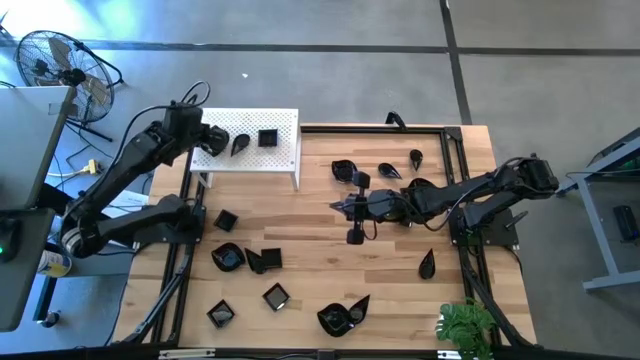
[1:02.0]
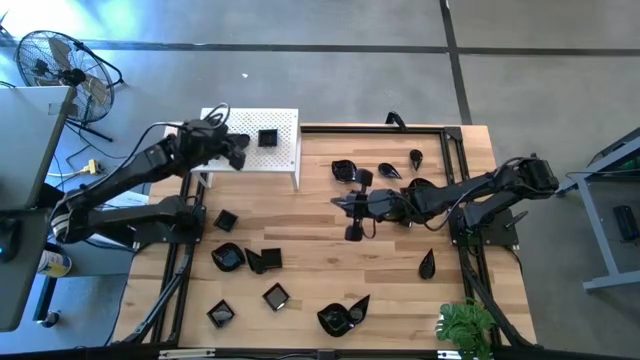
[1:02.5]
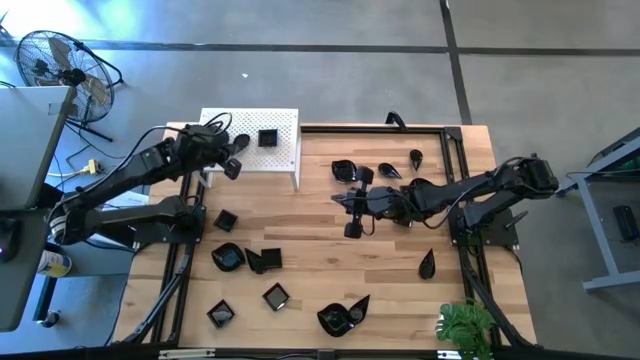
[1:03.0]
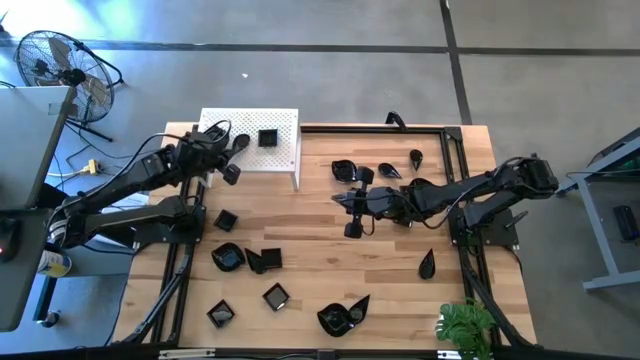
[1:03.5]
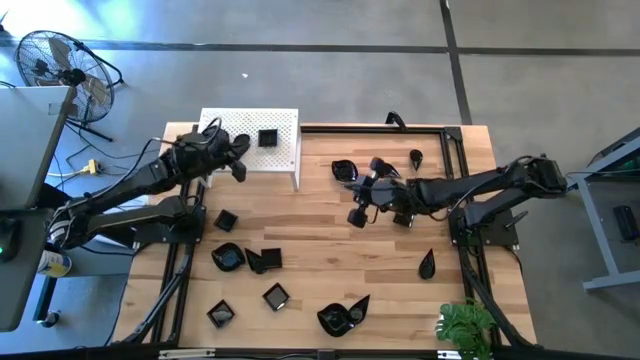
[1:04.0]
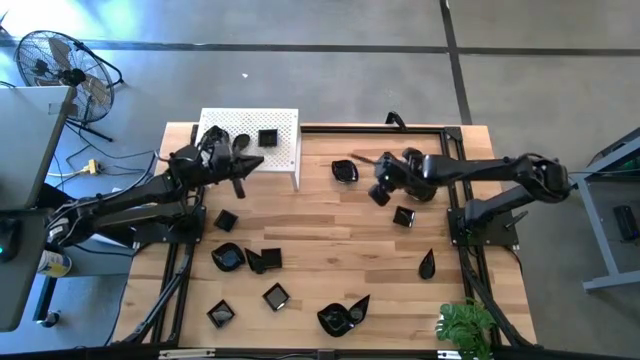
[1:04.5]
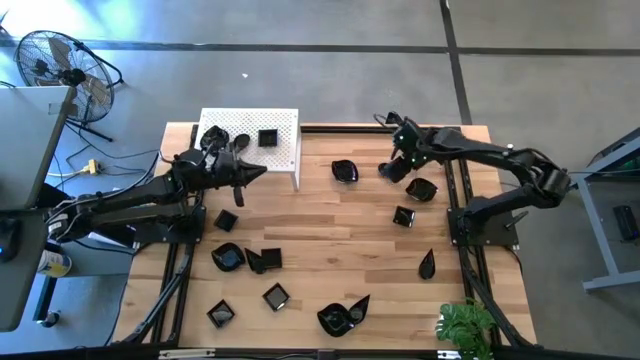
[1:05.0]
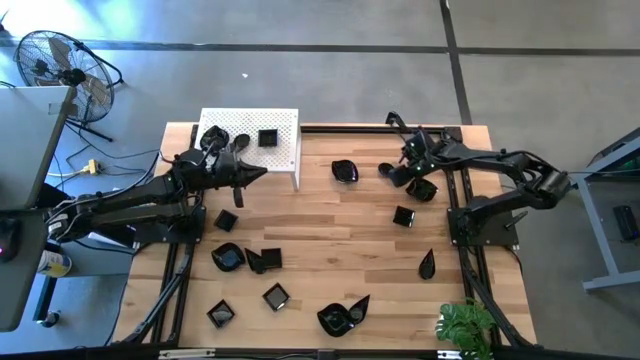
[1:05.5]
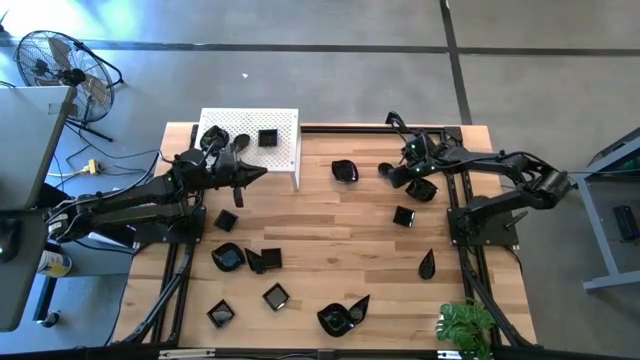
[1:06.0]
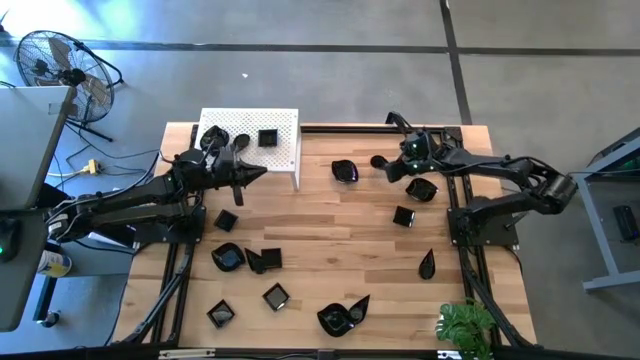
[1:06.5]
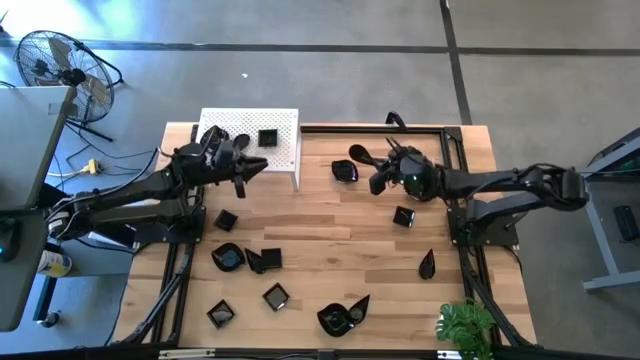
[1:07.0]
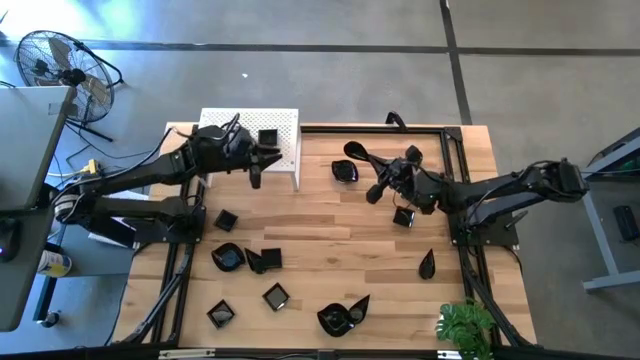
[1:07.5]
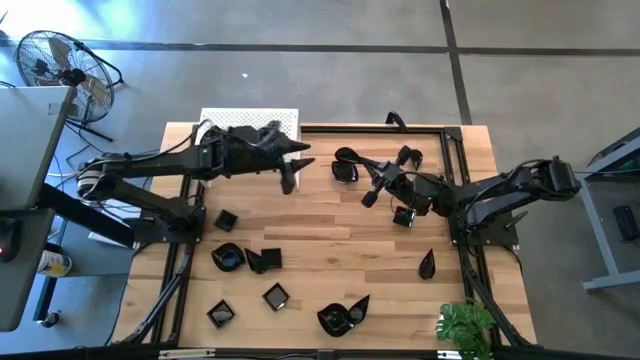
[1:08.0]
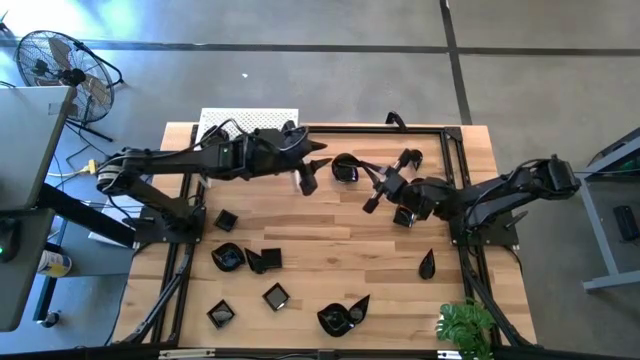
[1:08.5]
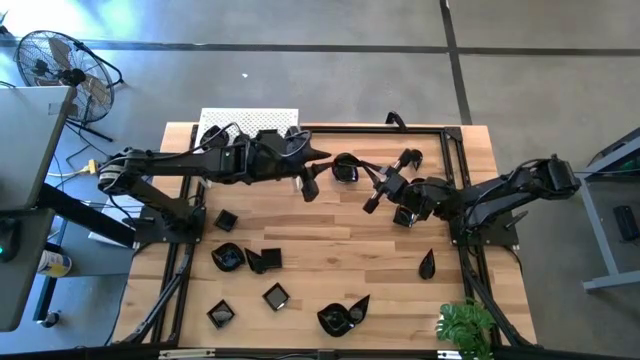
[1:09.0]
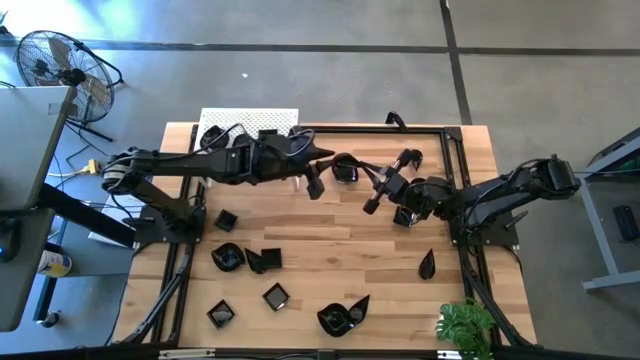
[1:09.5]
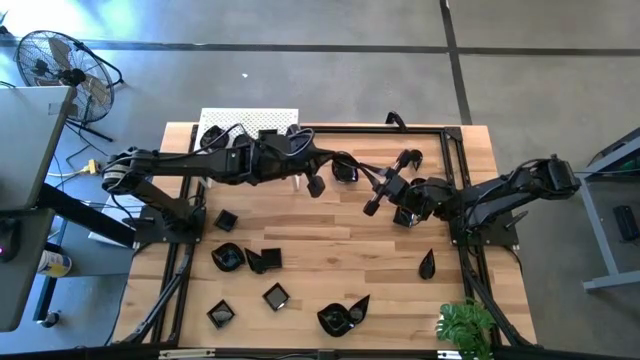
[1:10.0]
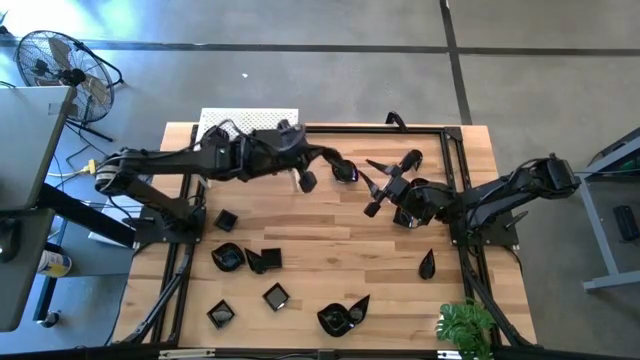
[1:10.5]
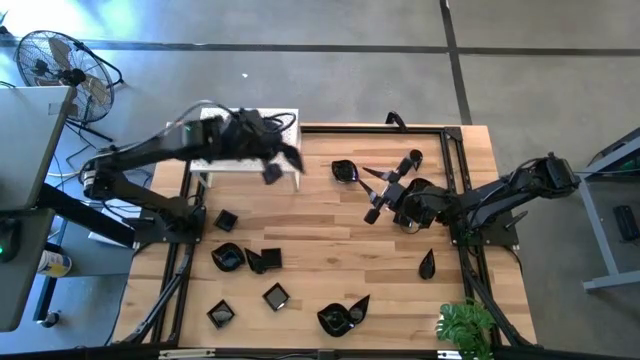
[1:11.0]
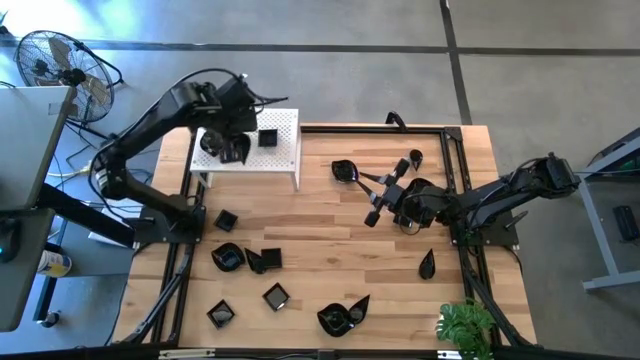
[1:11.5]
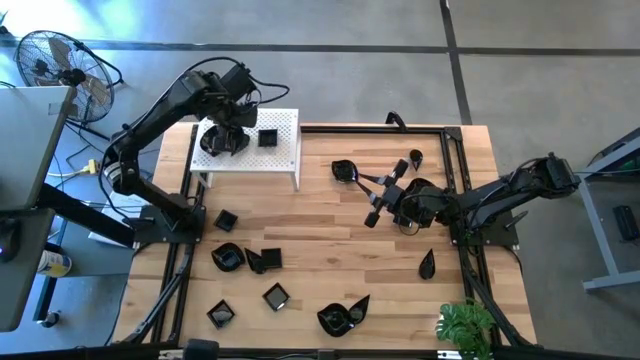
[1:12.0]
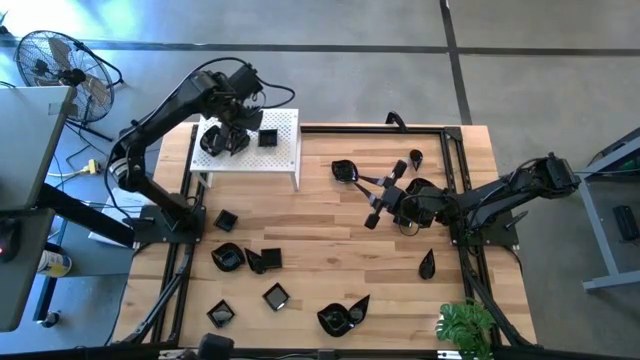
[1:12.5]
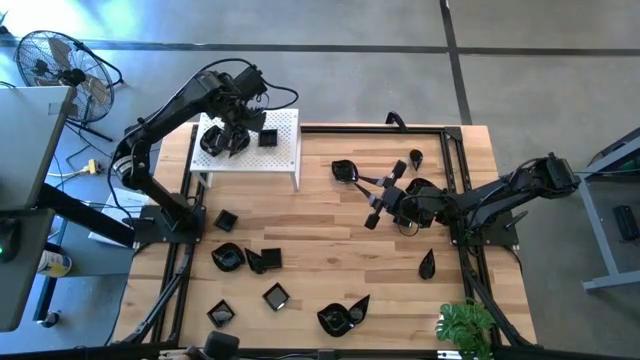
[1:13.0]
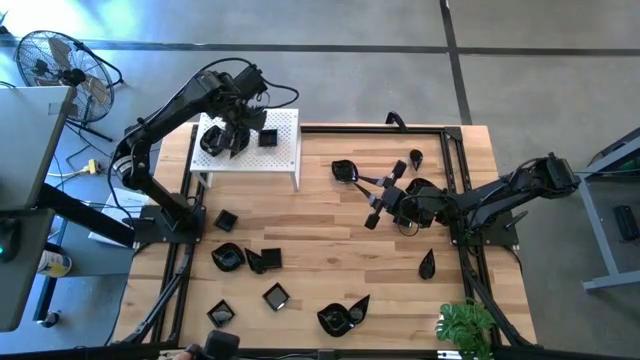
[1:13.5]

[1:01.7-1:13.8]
Task: Pick & Place Mini shaped plates
Stack the black drop shaped plate on top of the black drop shaped plate on the shelf

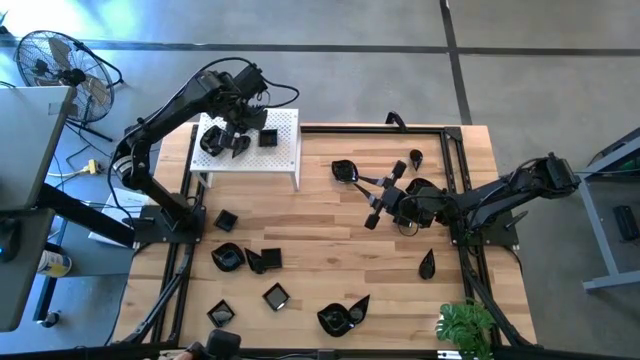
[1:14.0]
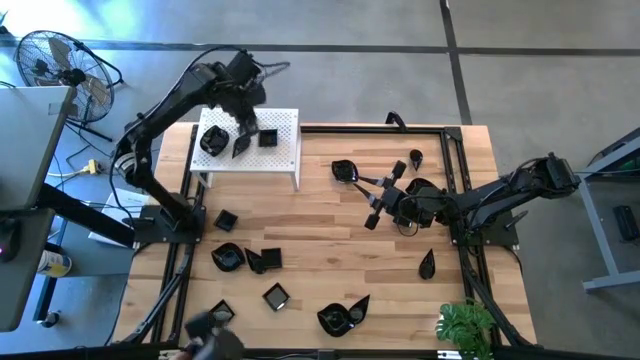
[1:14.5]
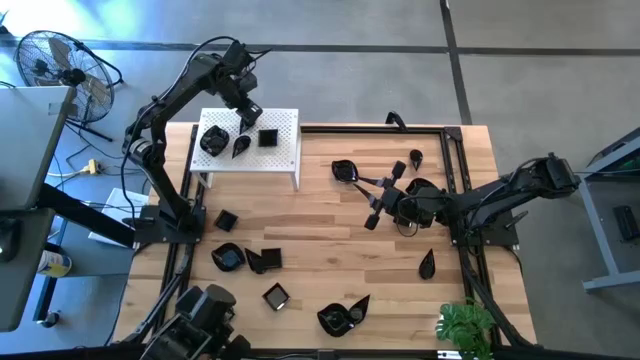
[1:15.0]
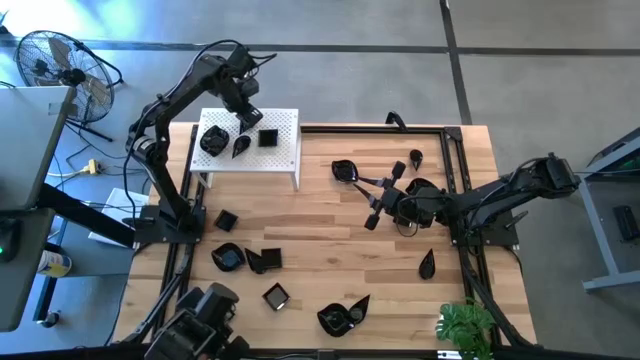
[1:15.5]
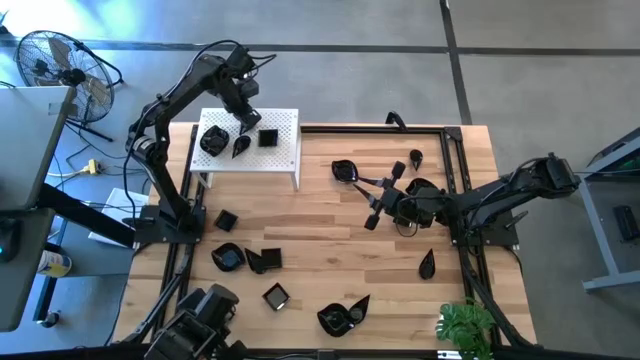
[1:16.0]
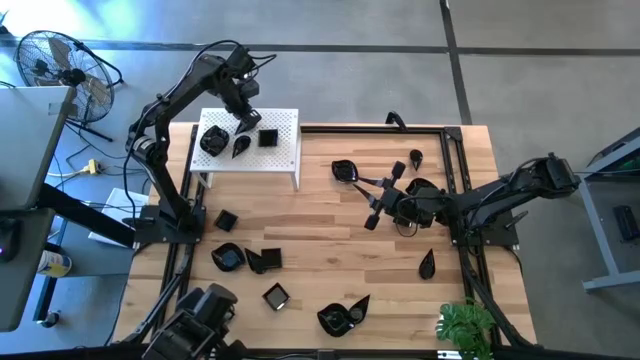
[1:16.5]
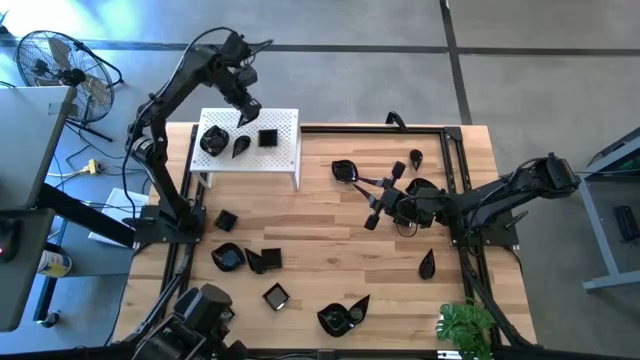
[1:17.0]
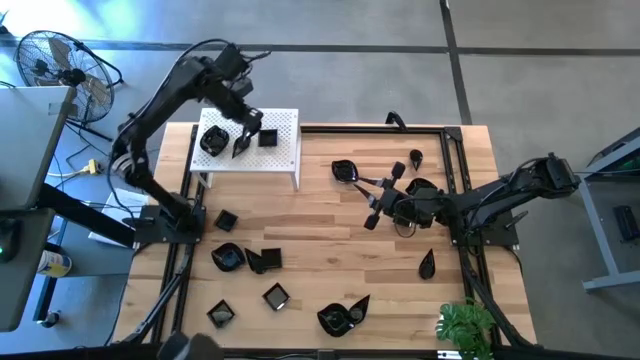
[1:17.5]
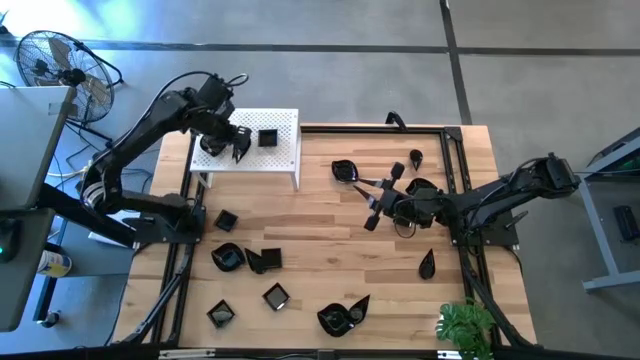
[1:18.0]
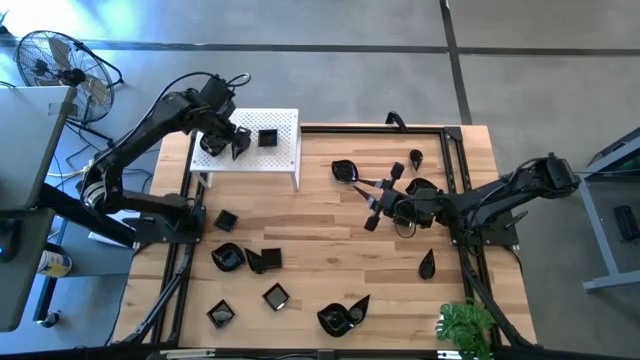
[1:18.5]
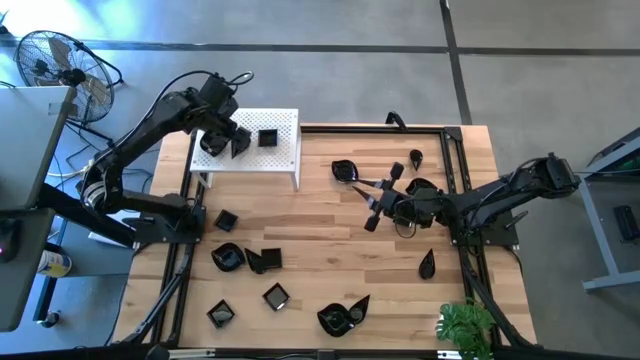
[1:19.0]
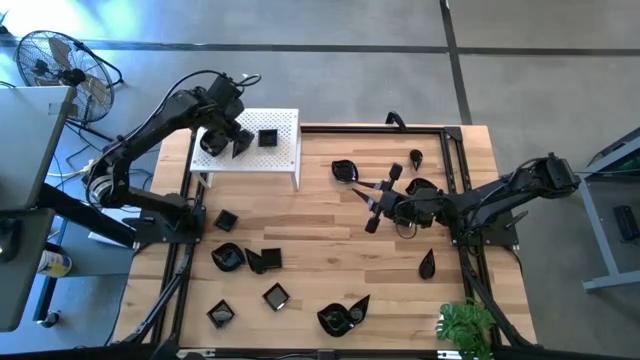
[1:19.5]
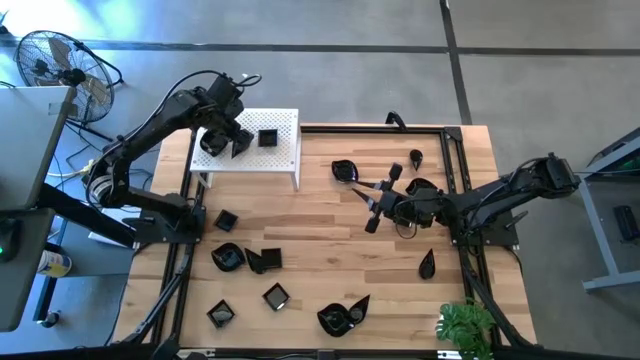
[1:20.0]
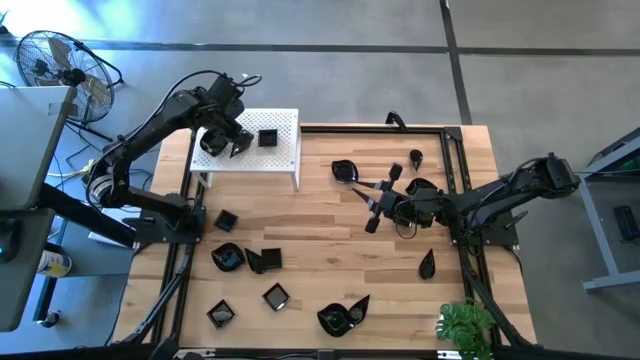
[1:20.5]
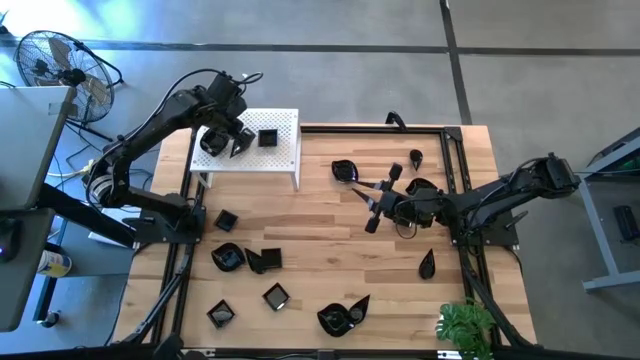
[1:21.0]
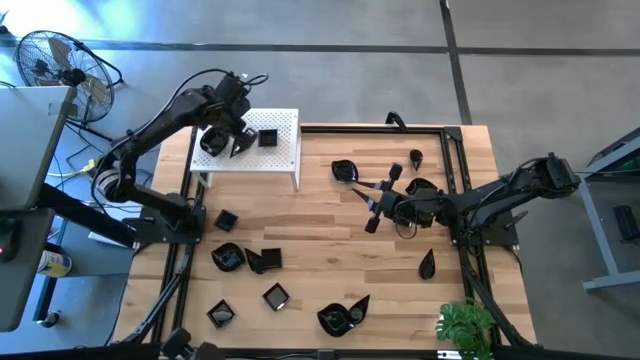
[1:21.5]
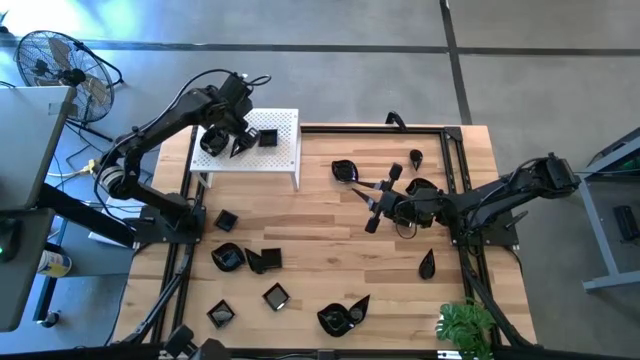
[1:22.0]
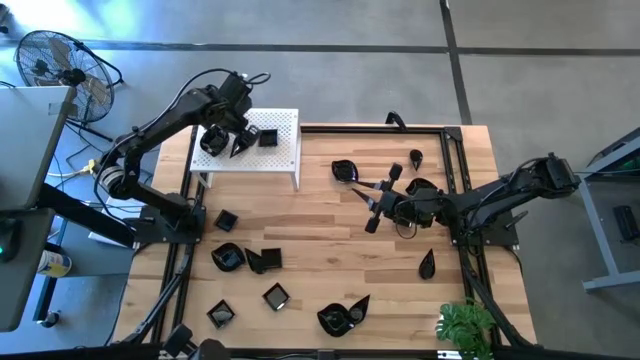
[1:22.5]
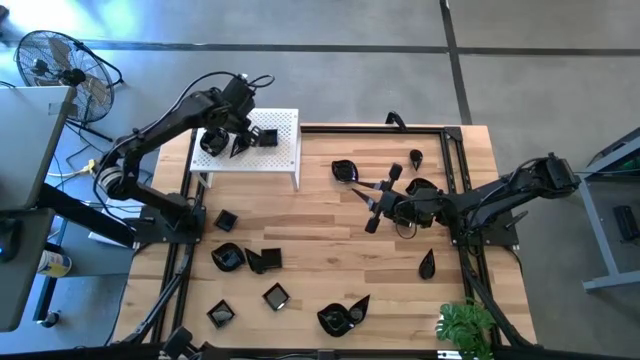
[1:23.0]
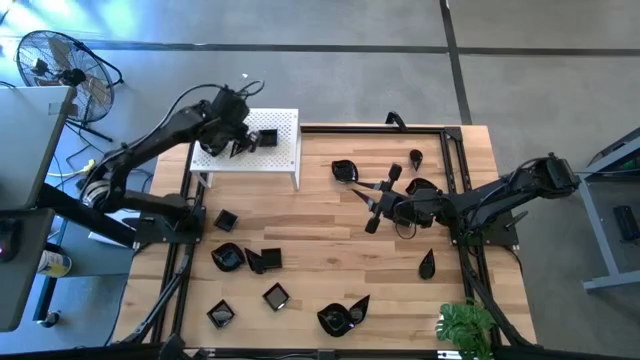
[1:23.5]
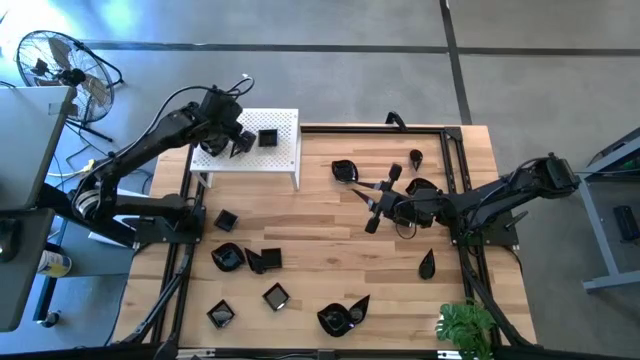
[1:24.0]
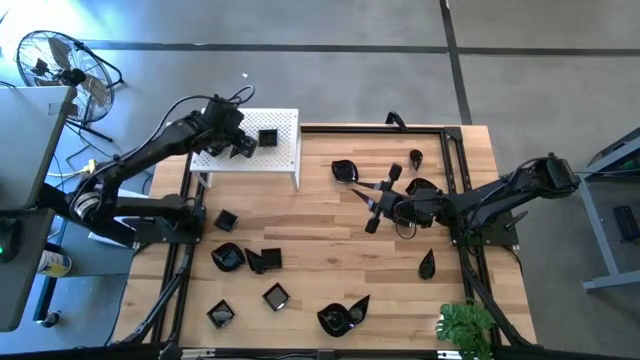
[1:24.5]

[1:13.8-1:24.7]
Stack the black drop shaped plate on top of the black drop shaped plate on the shelf
